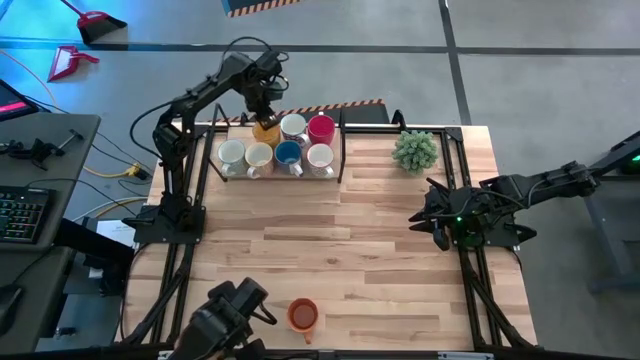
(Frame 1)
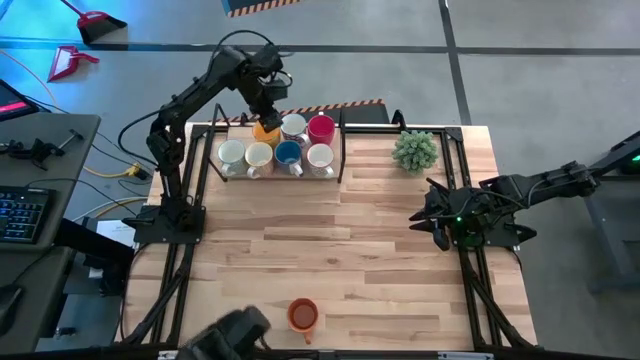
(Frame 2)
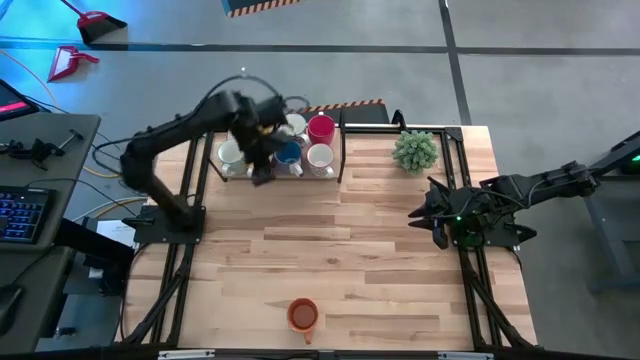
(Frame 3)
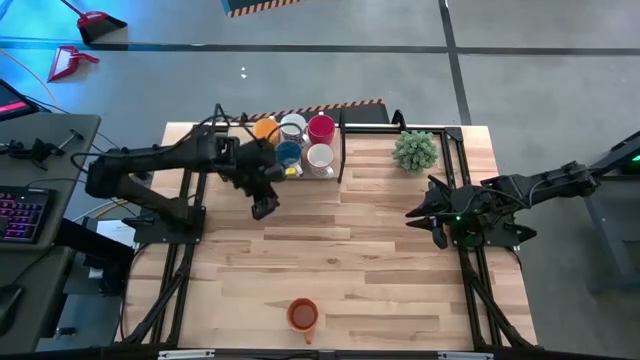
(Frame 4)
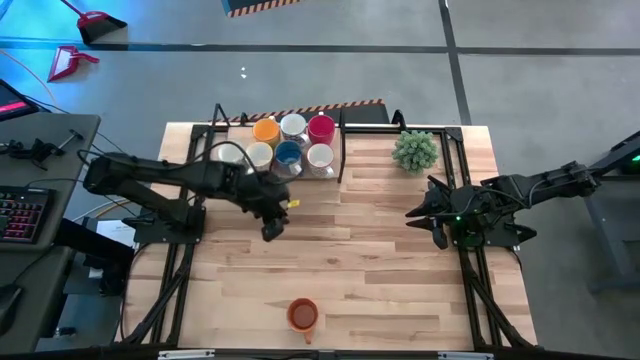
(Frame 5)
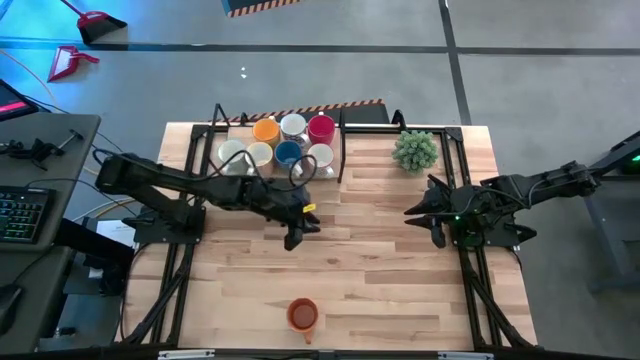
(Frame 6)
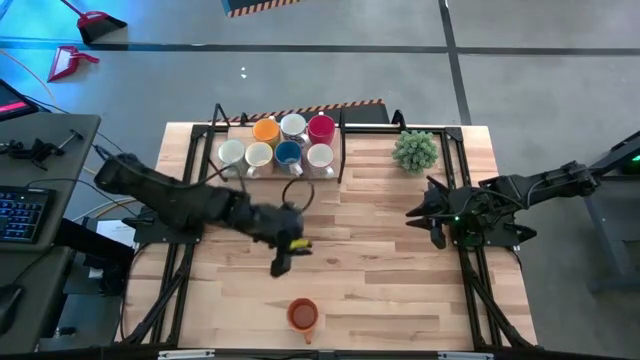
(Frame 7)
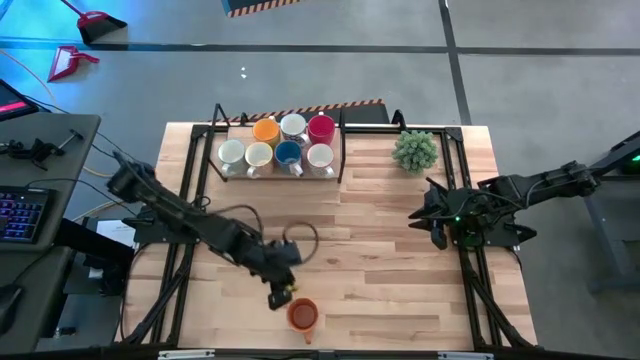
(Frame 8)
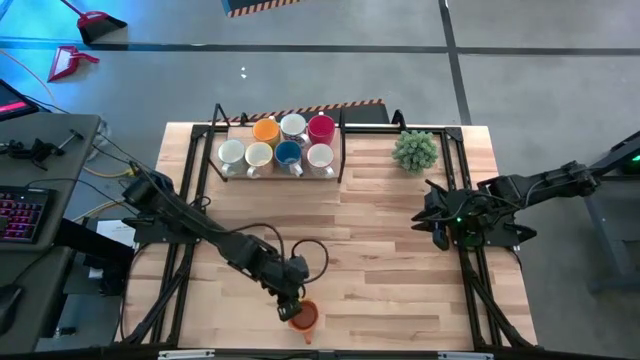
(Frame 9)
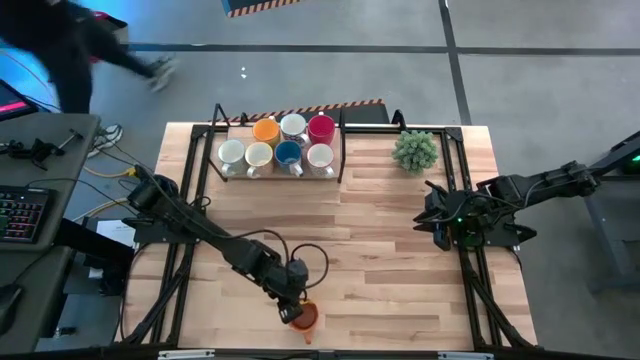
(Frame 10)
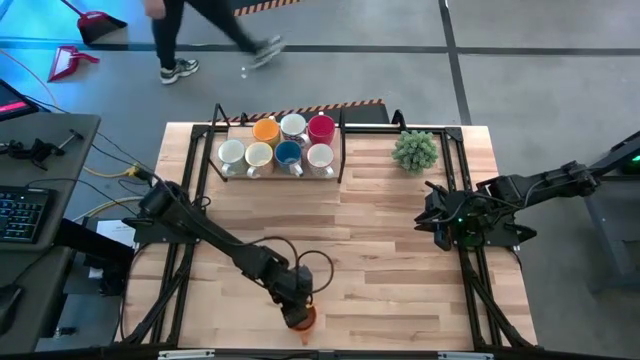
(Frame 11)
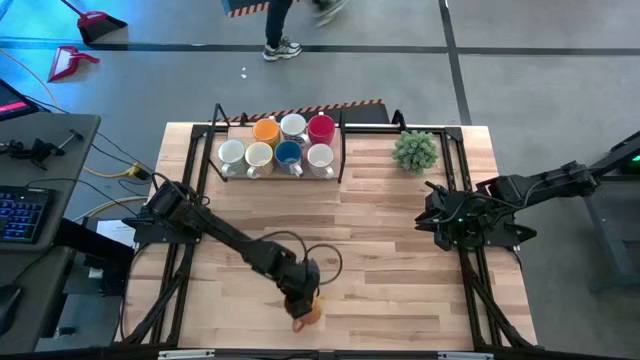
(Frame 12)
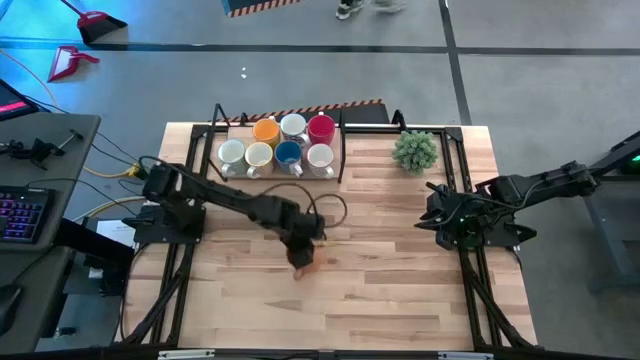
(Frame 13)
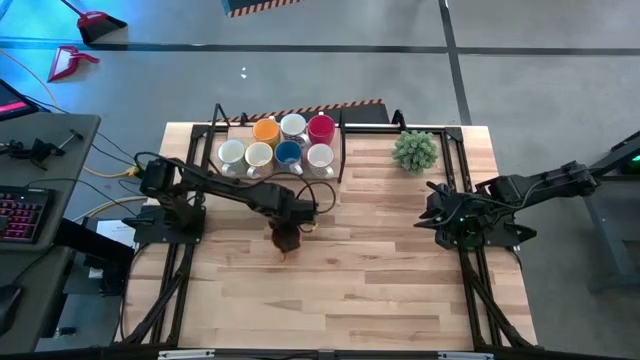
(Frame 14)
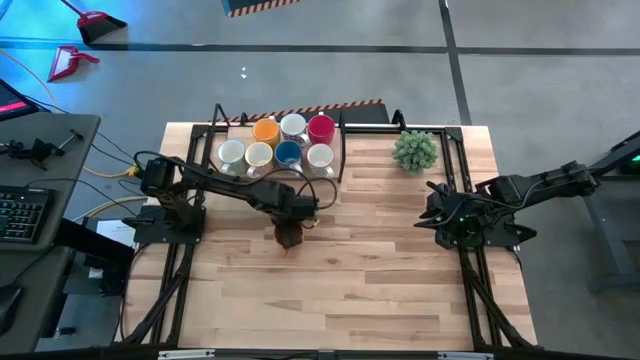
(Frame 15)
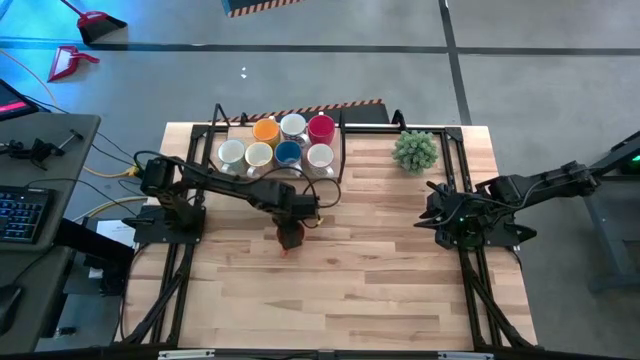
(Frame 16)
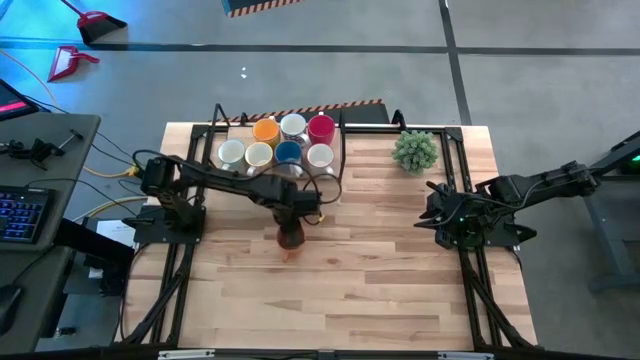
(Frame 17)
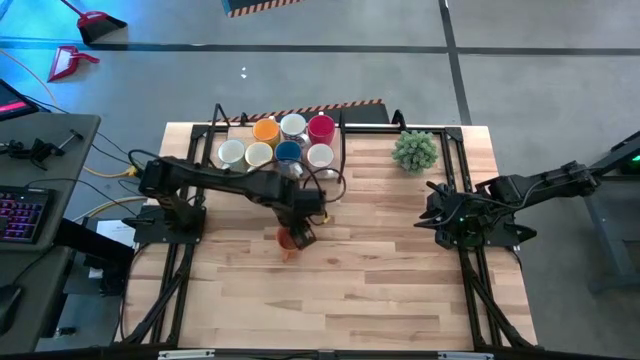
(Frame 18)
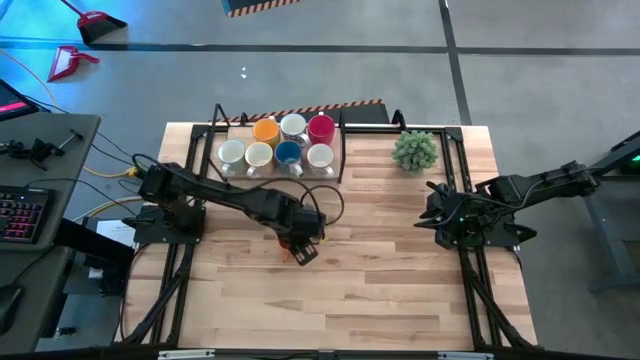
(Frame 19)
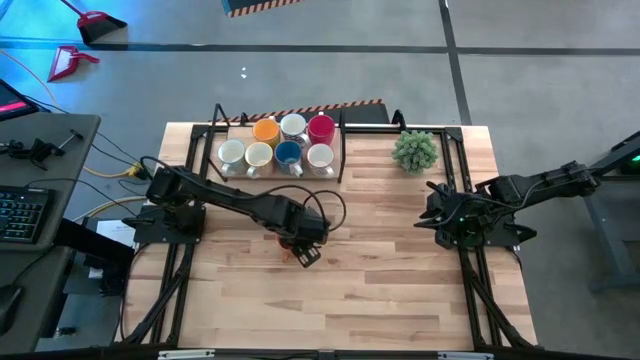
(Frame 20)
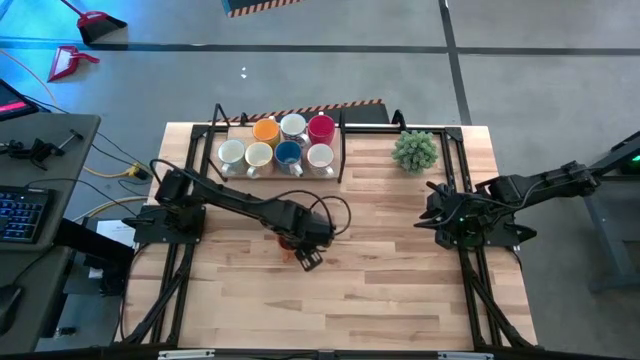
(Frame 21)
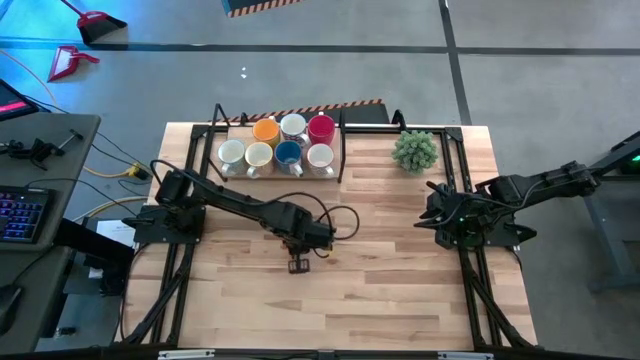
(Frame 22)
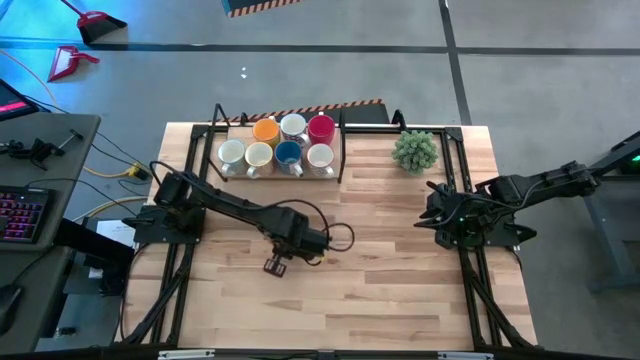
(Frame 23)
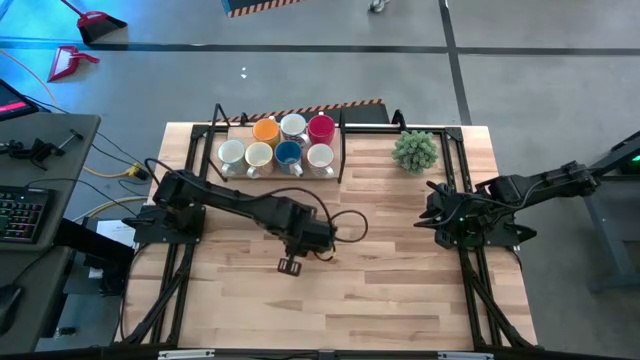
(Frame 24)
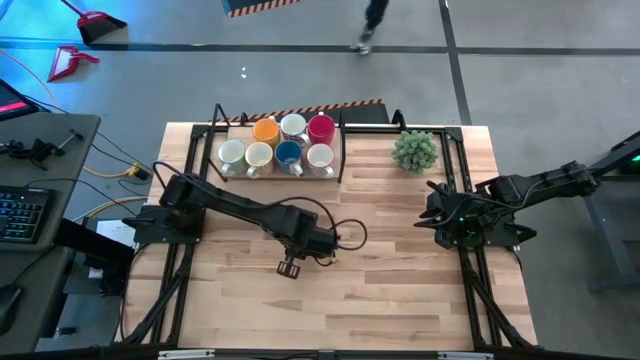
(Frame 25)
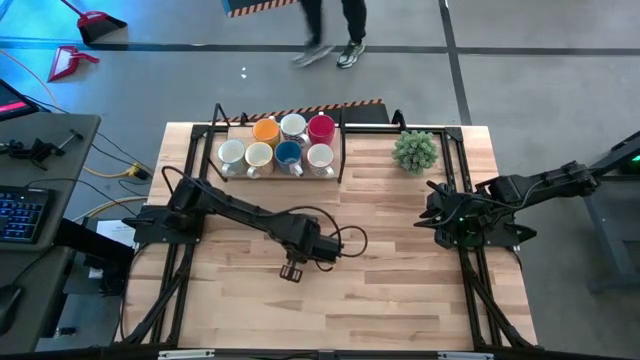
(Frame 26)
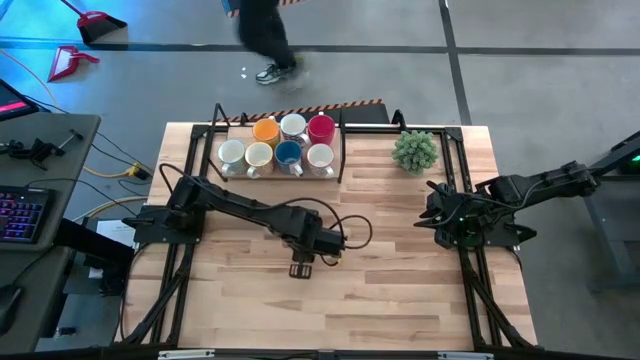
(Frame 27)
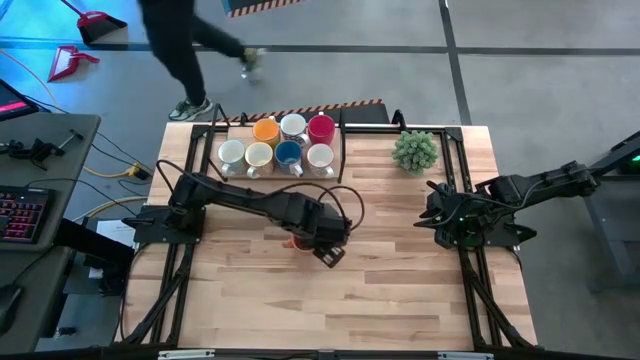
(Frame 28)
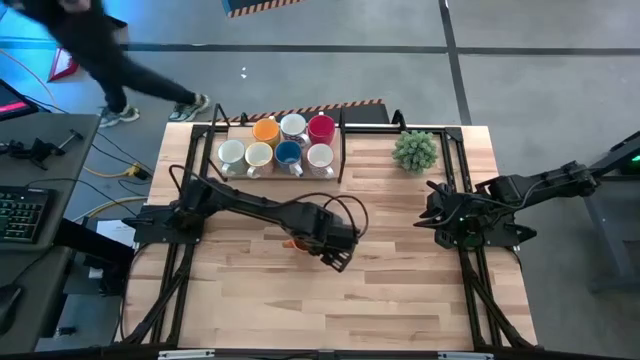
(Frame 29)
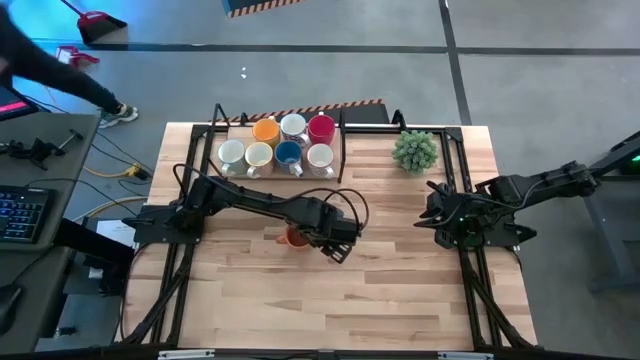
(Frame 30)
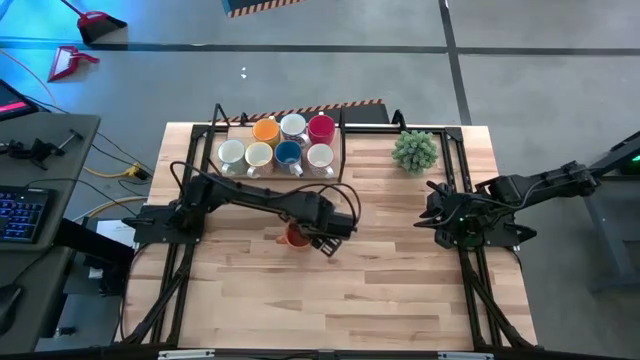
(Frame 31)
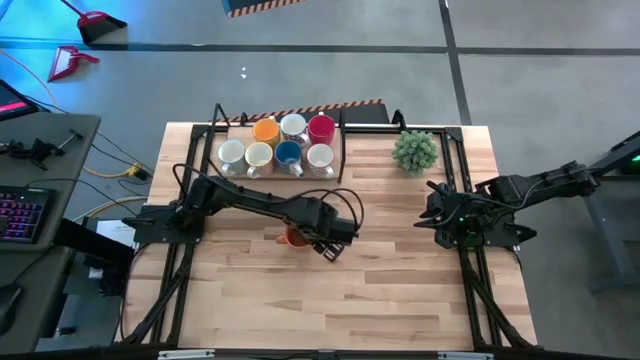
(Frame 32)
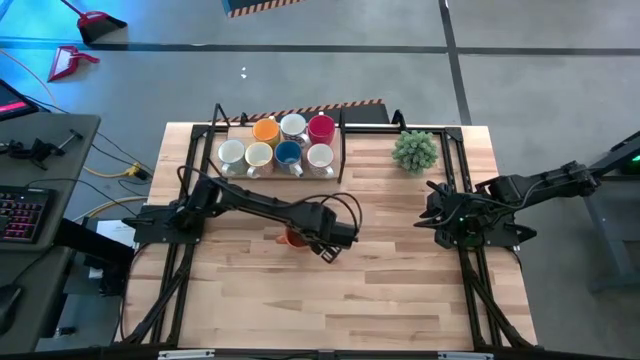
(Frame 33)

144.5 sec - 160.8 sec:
Task: Place coffee mugs
Put the orange mug on the shelf
